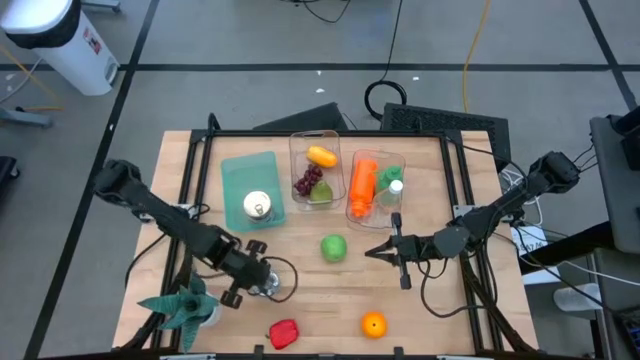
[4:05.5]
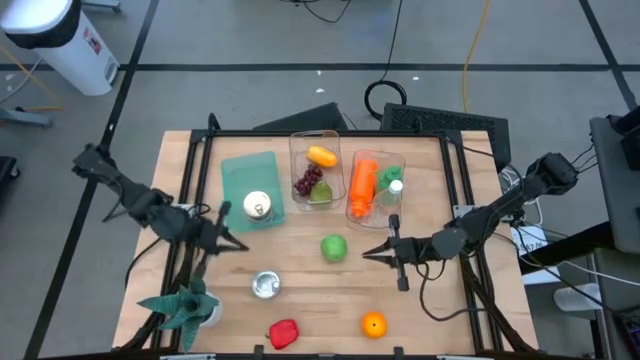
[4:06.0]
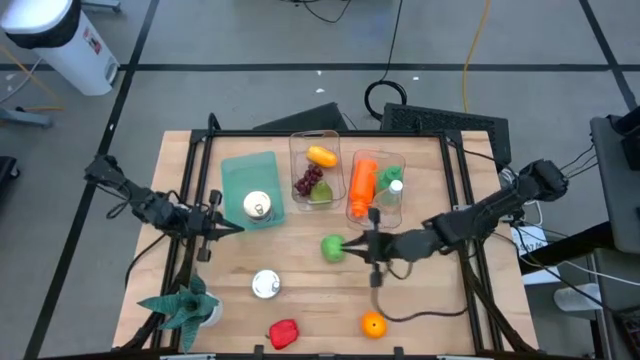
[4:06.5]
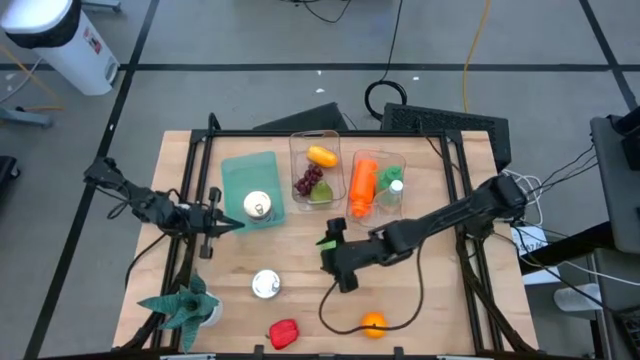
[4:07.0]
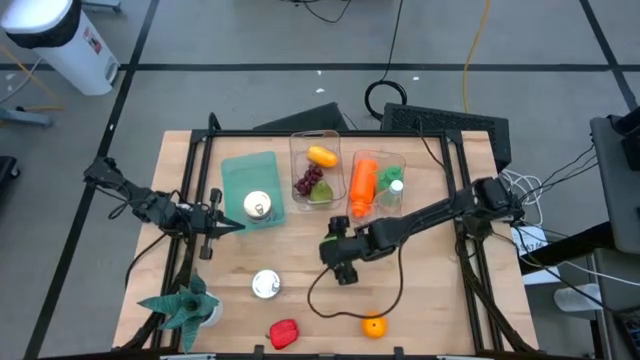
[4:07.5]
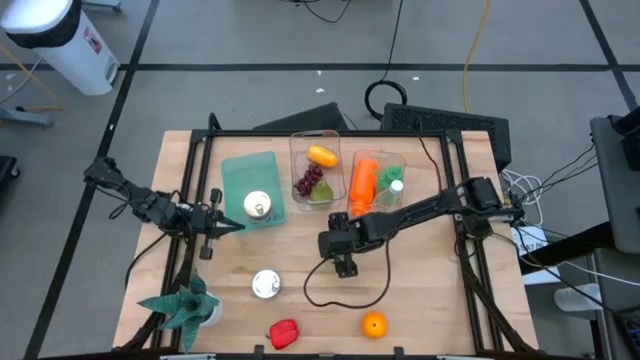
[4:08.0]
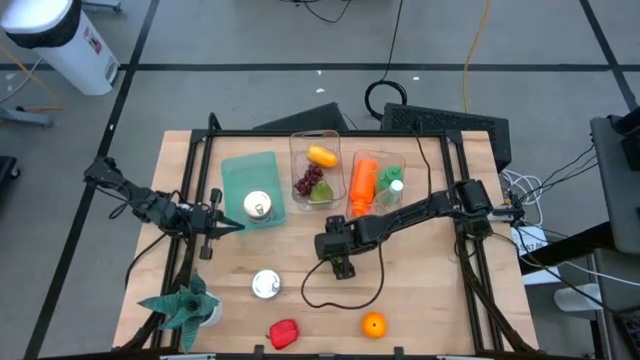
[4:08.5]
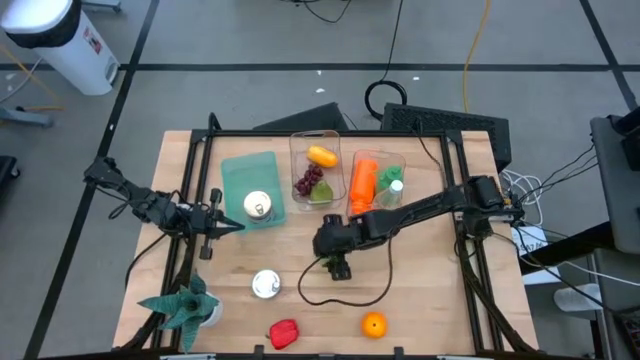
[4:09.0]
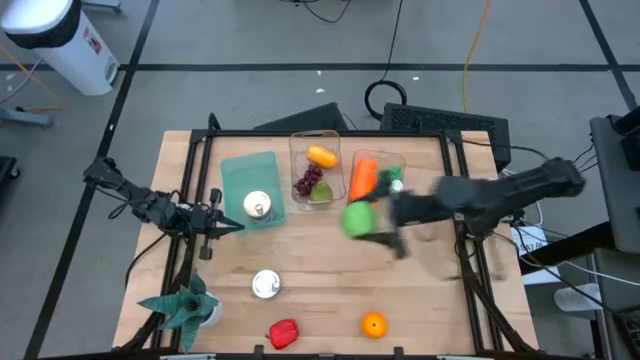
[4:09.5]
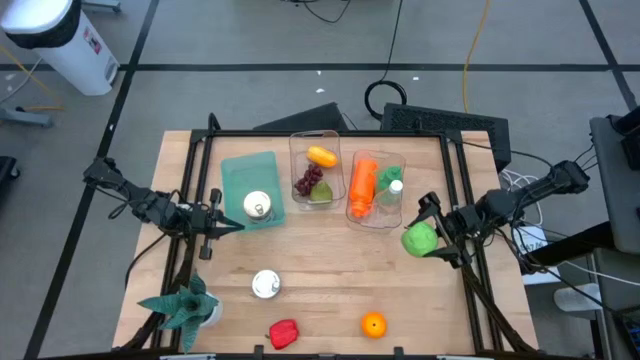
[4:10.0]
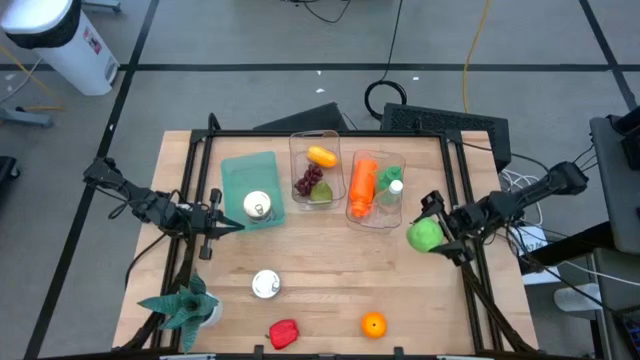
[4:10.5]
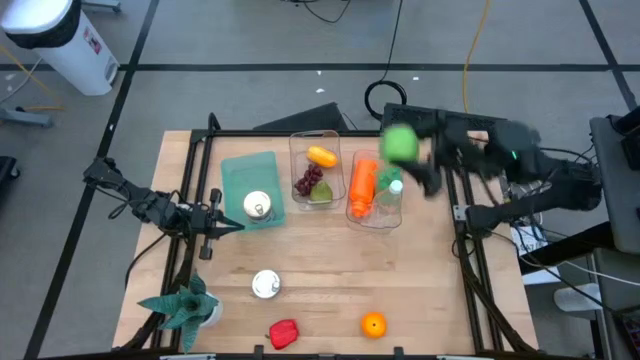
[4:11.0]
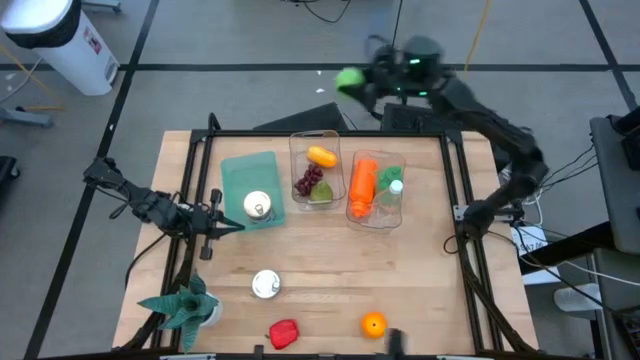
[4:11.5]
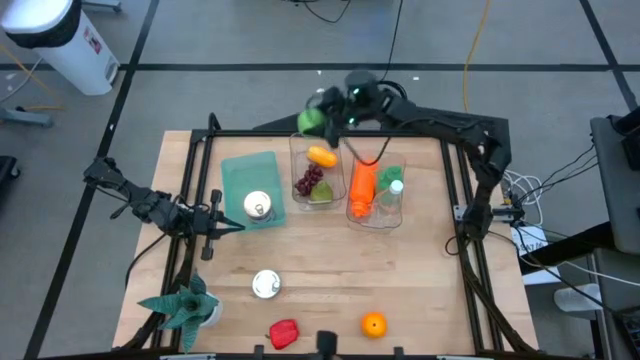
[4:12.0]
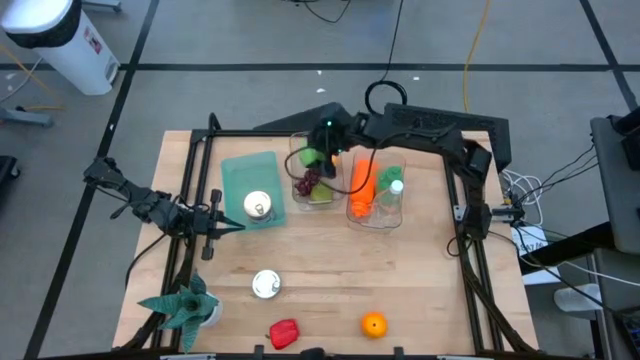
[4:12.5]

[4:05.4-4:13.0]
Task: Pick & Place Food Item
Put the green apple into the left transparent bin

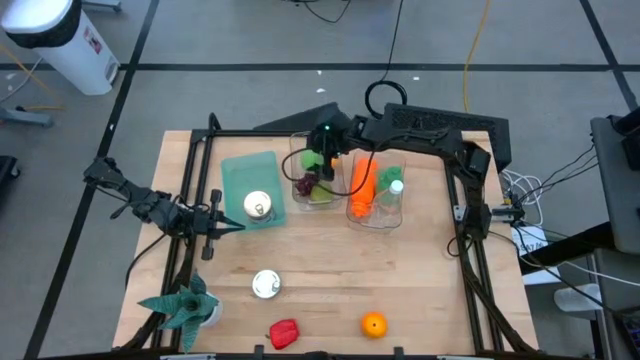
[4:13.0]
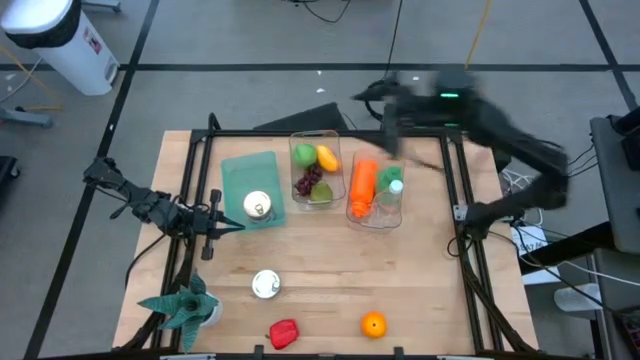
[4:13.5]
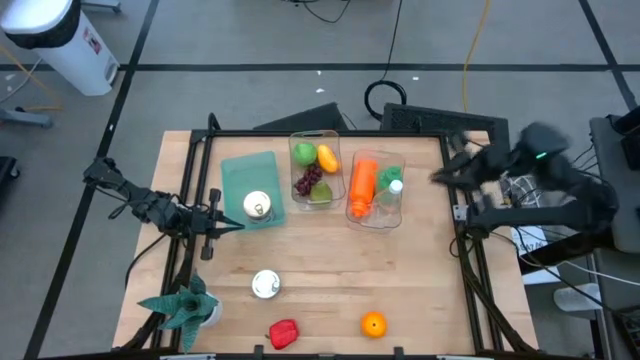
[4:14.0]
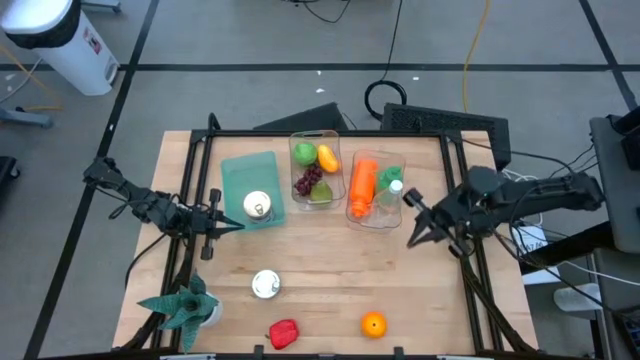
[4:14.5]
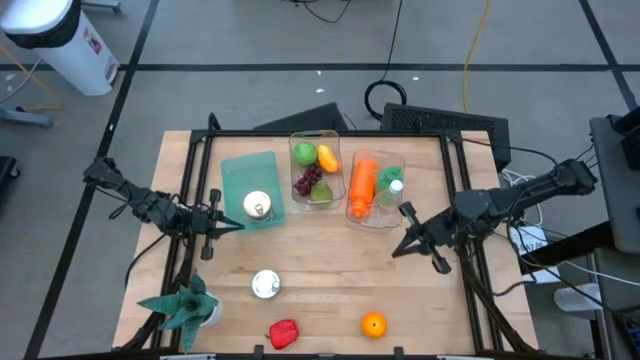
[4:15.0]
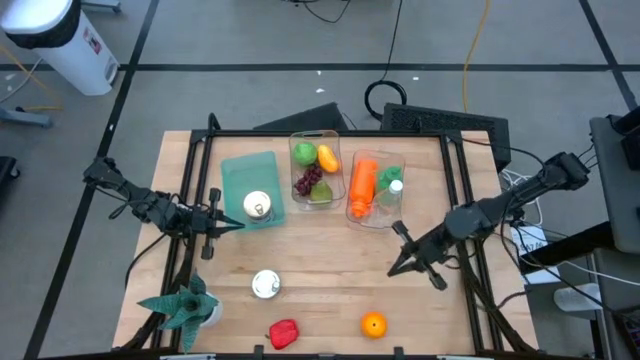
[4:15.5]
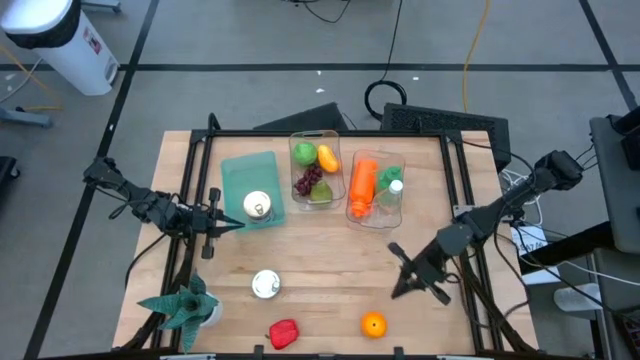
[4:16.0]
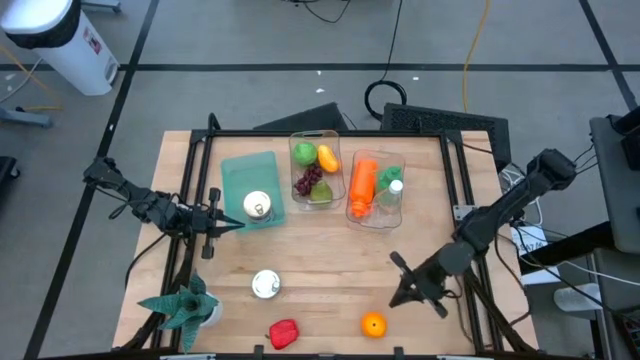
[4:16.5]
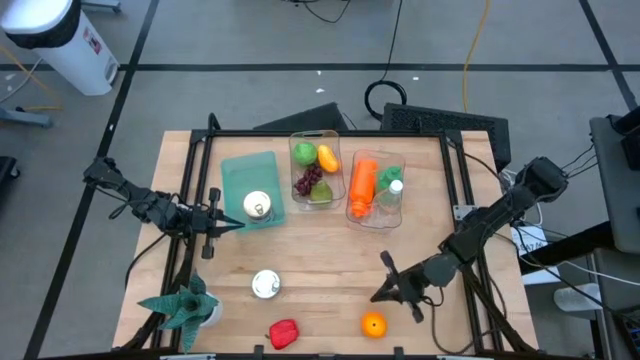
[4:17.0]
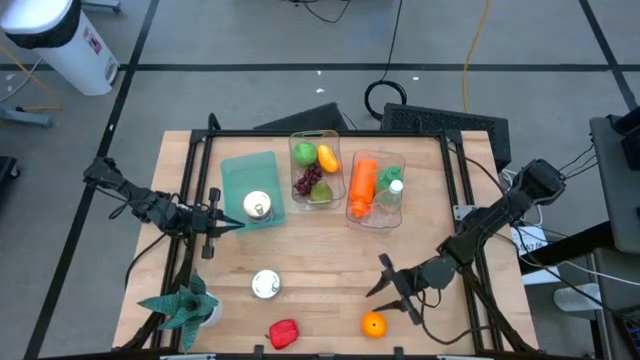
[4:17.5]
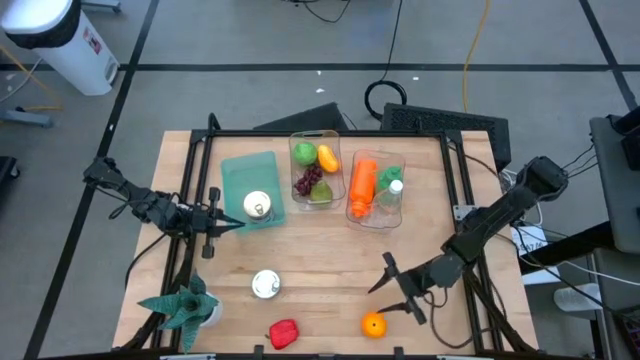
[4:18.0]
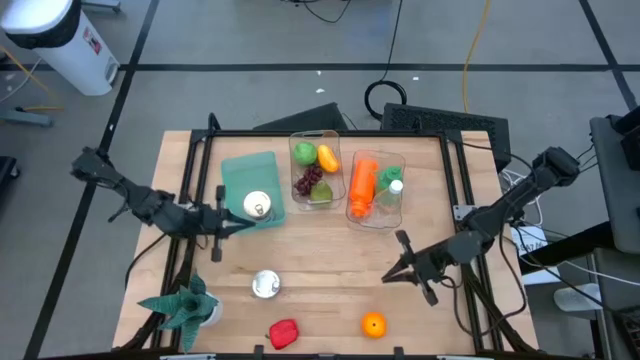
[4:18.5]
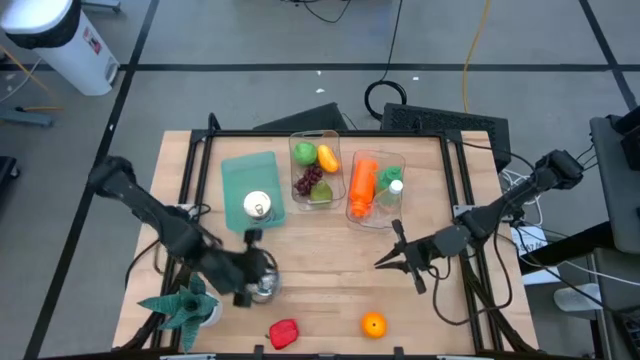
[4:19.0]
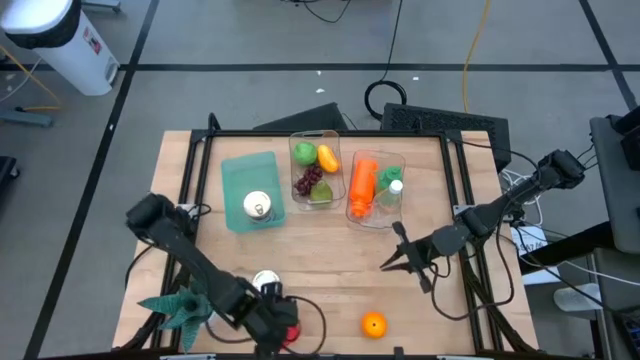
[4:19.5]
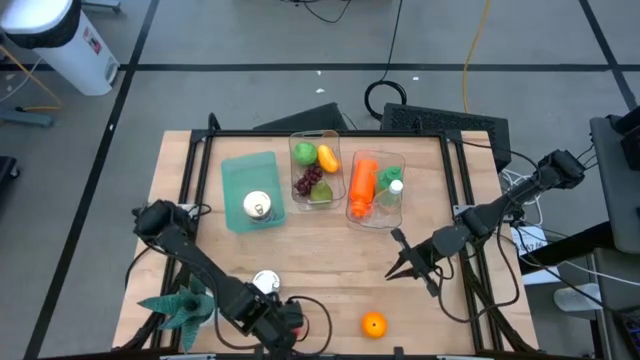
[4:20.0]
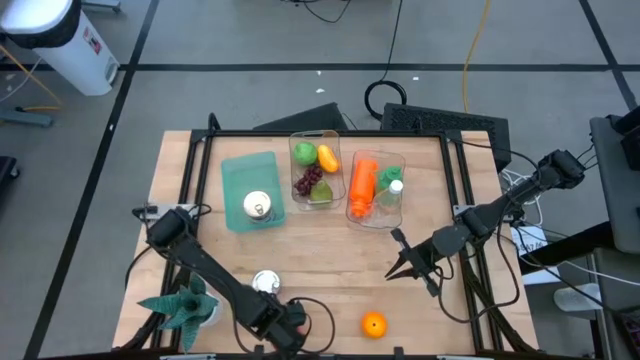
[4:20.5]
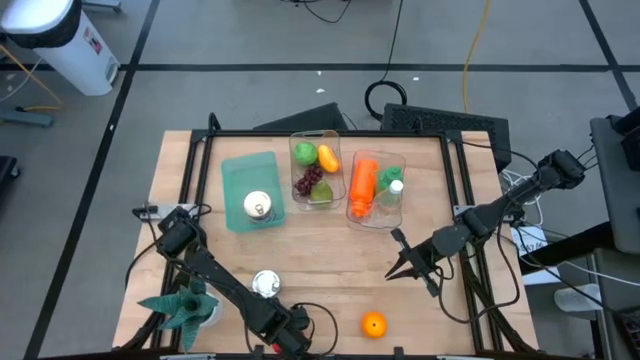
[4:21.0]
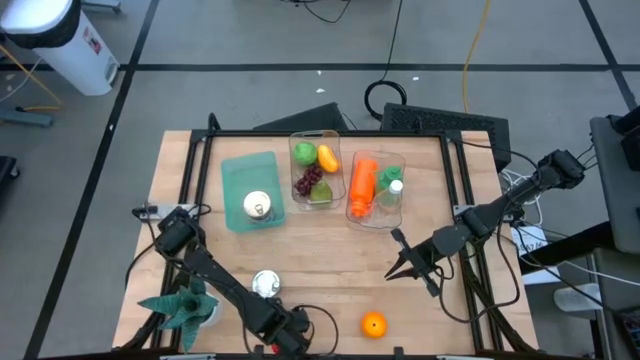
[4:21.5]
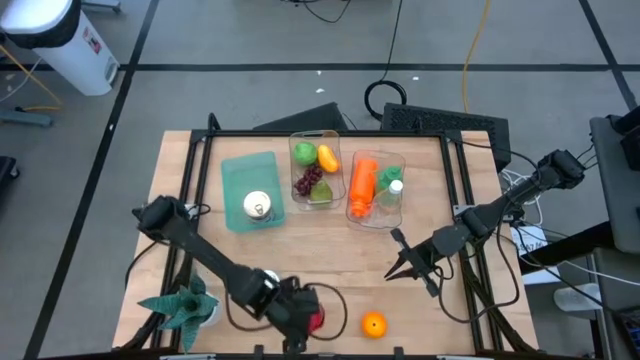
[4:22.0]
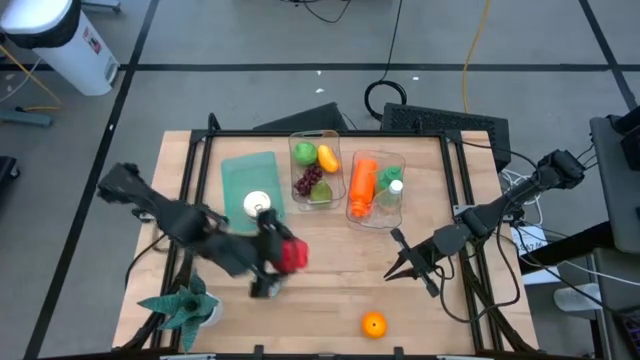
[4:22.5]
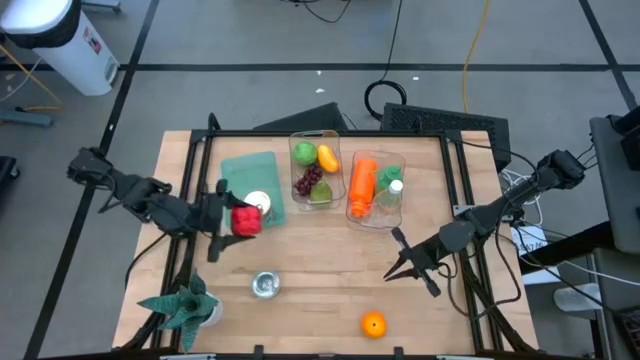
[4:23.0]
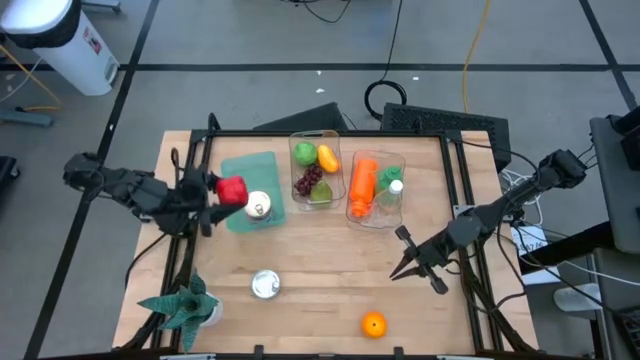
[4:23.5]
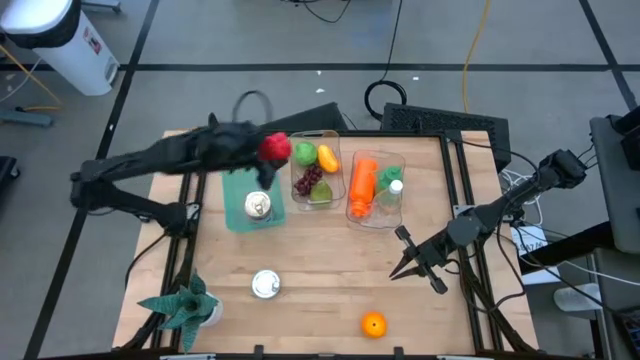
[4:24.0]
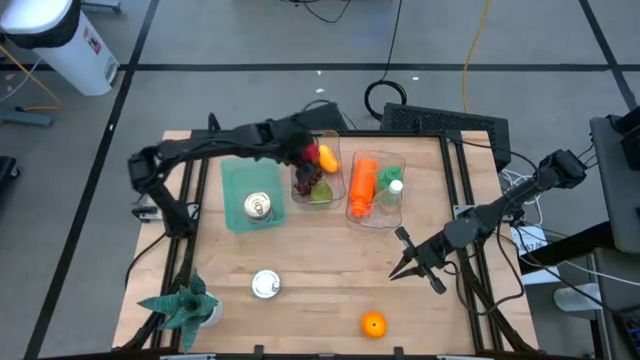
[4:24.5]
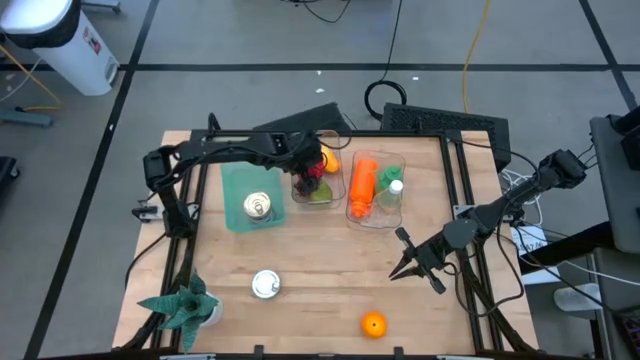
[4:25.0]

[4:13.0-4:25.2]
Put the red bell pepper into the left transparent bin
